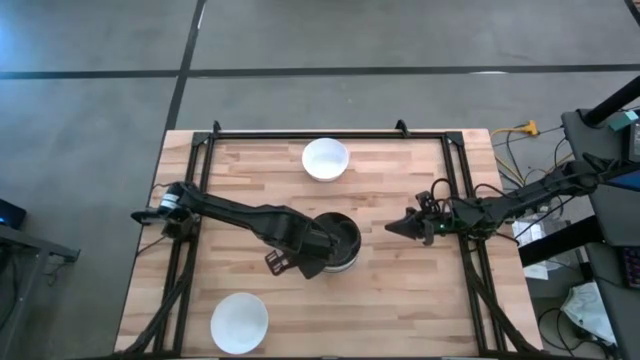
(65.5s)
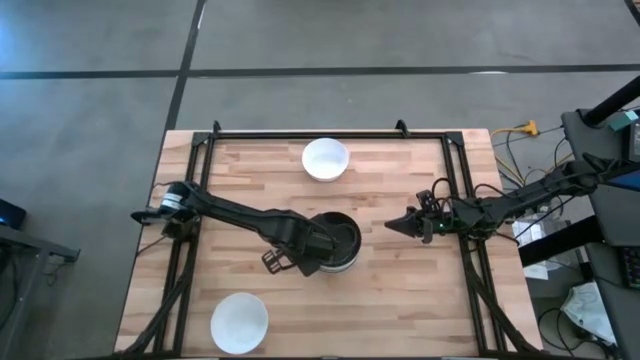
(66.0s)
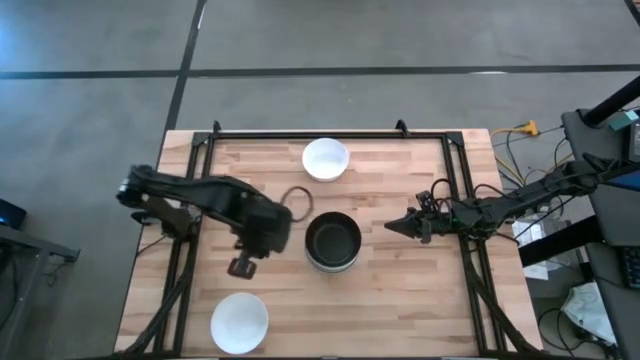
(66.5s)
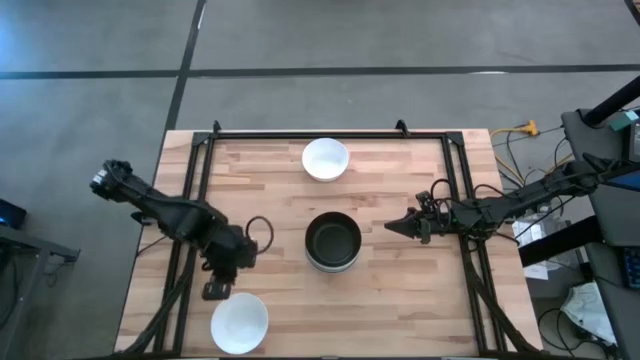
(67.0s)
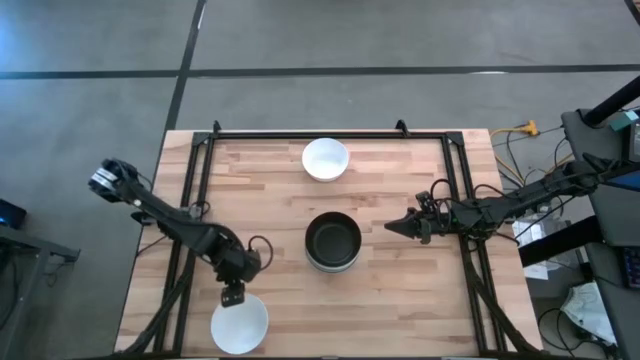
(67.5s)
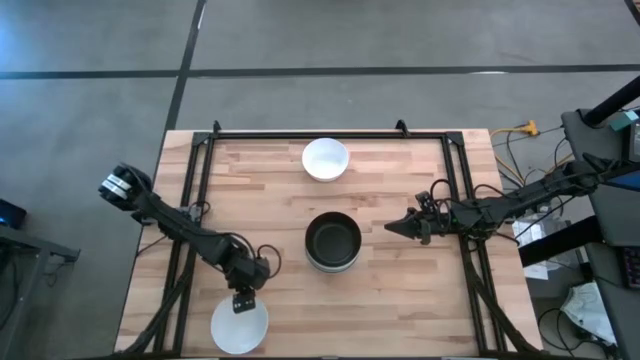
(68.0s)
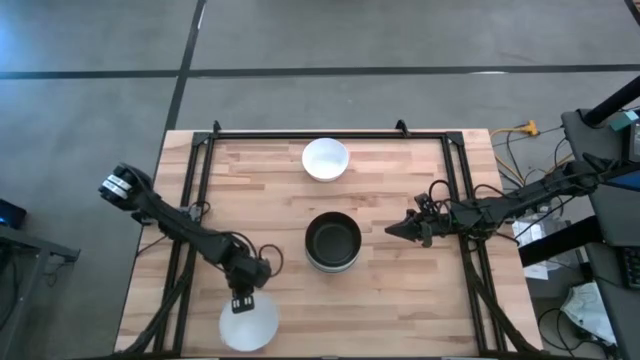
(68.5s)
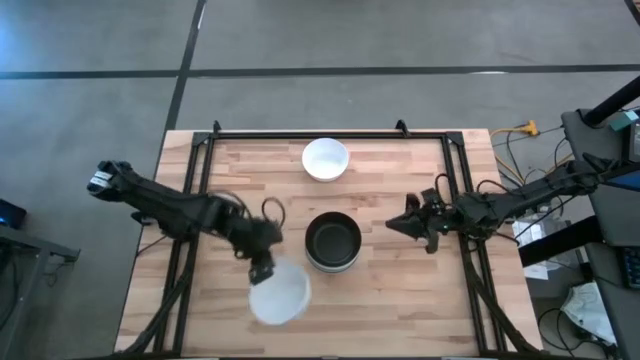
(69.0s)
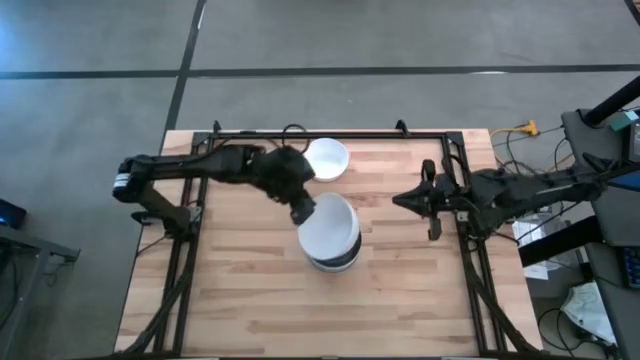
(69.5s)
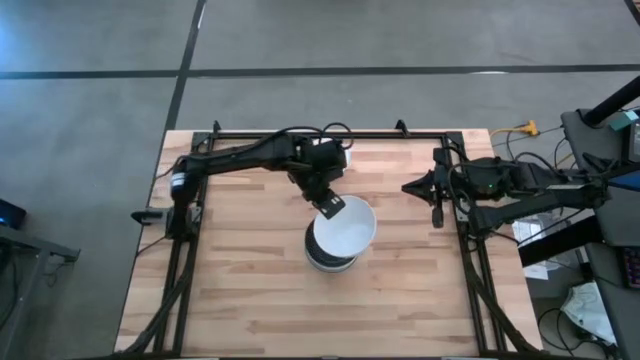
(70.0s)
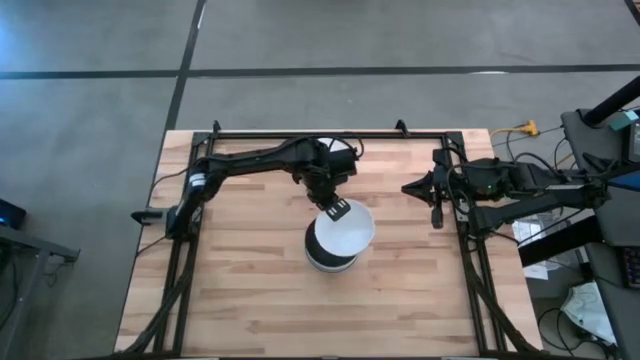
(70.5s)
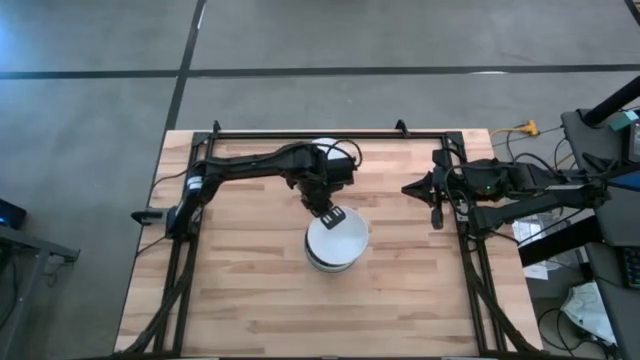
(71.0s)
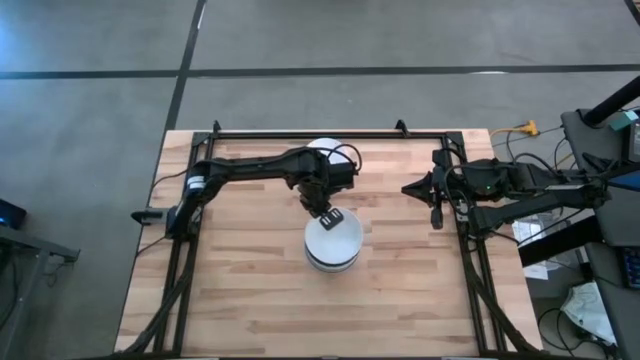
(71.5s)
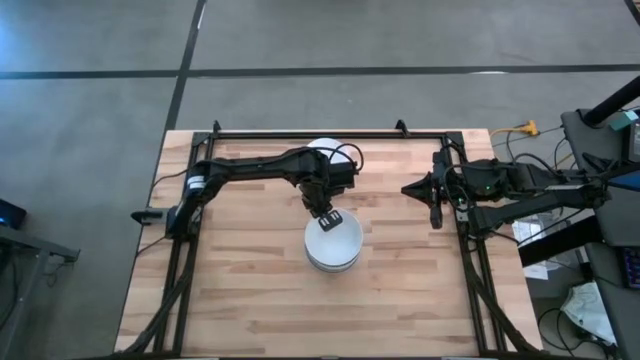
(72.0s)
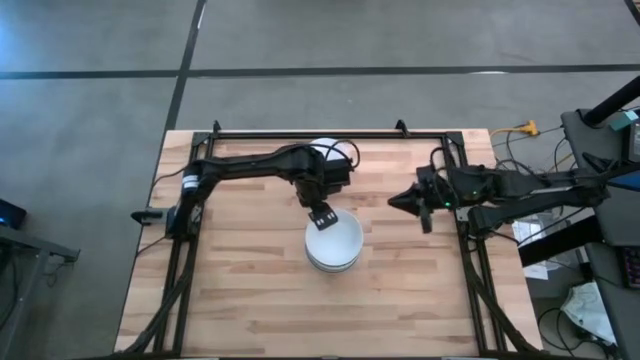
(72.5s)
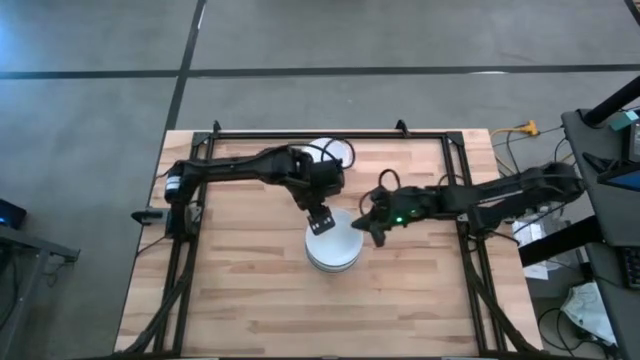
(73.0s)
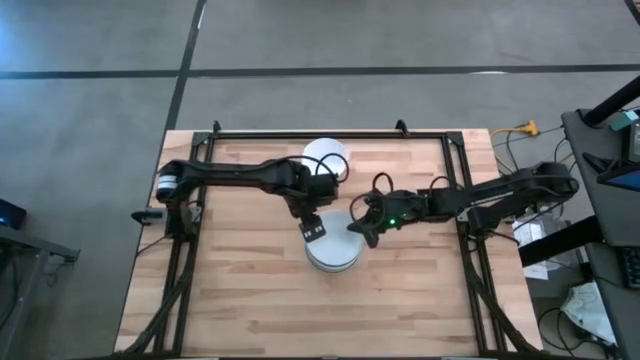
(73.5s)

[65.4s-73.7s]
Task: Nest bowls inside each other
Stack the white bowl on the top of the black bowl

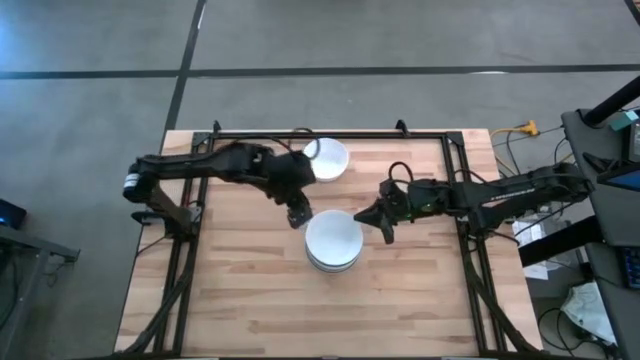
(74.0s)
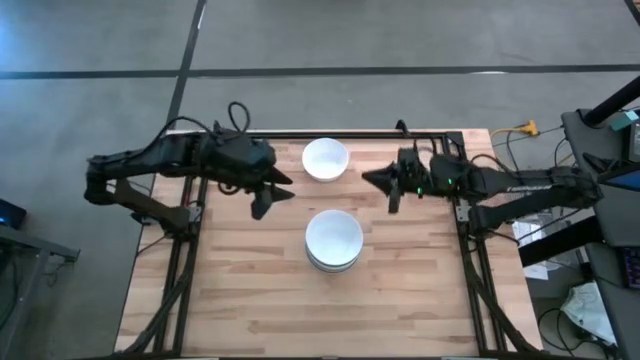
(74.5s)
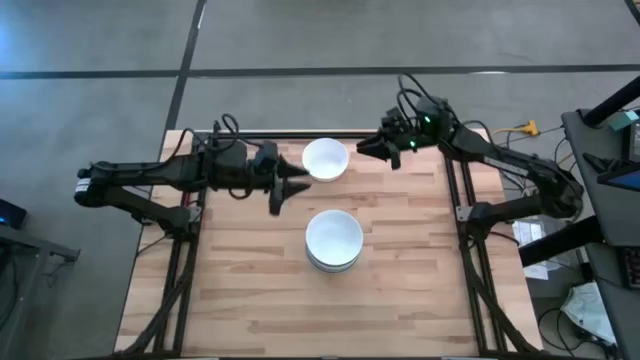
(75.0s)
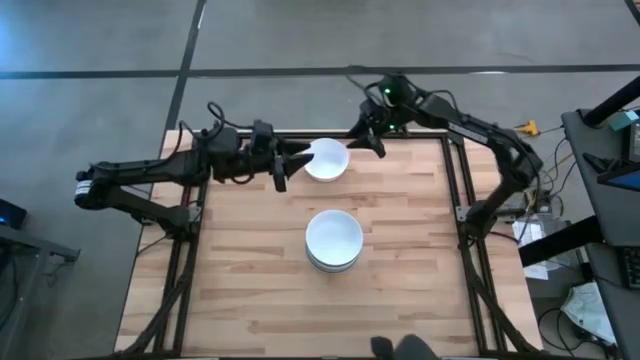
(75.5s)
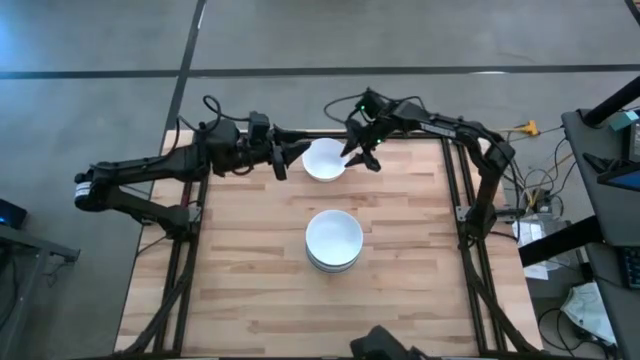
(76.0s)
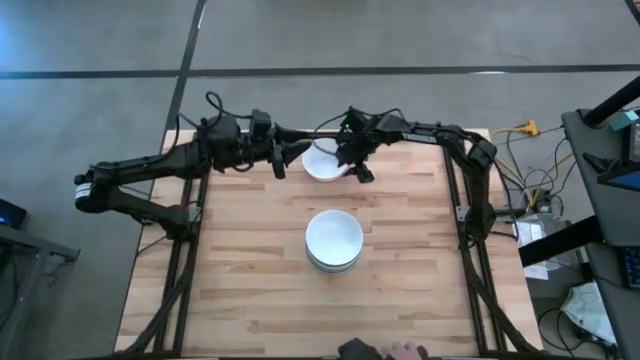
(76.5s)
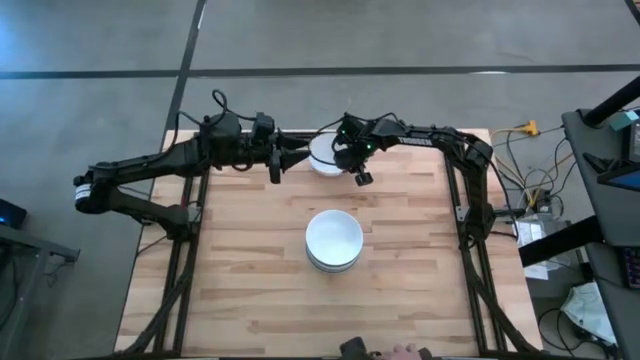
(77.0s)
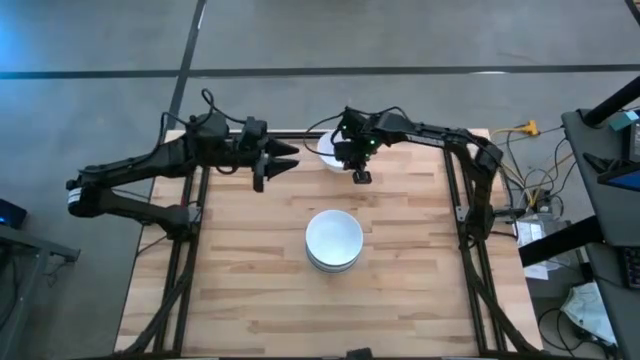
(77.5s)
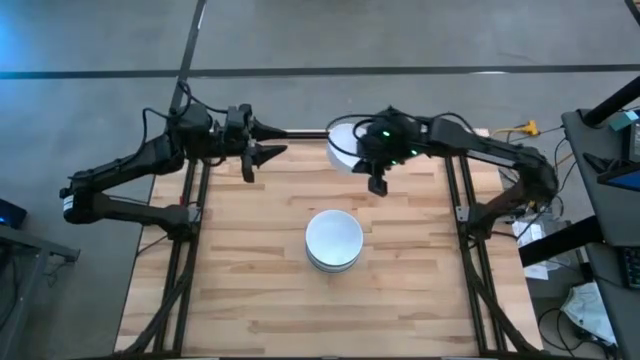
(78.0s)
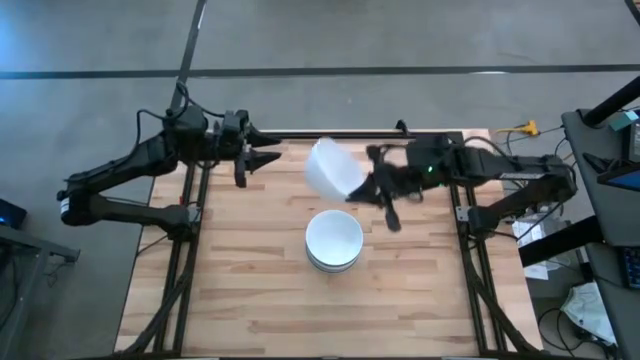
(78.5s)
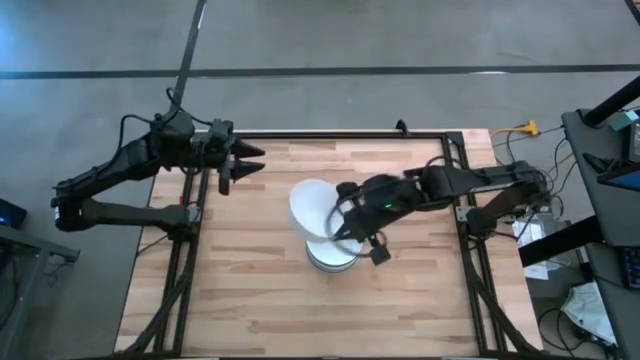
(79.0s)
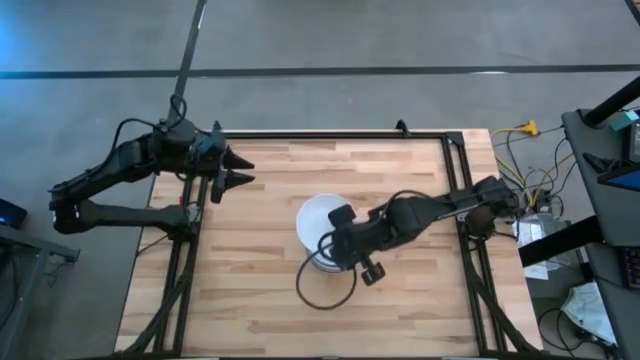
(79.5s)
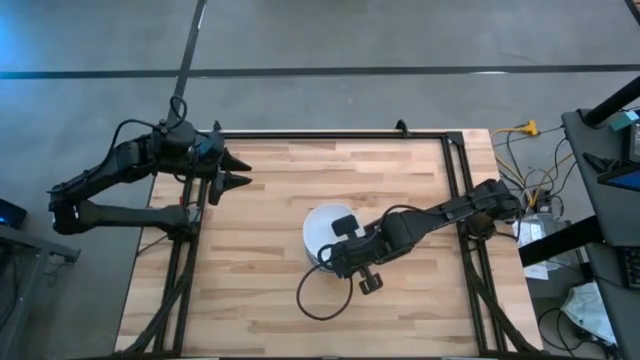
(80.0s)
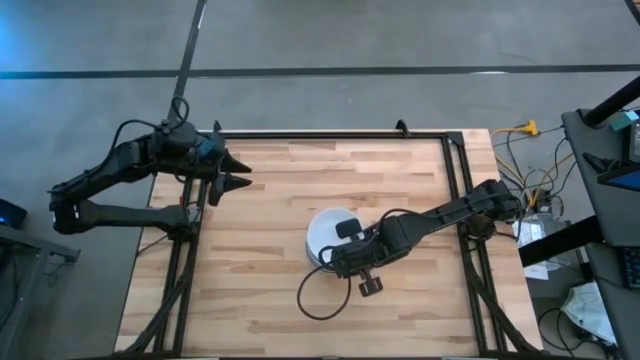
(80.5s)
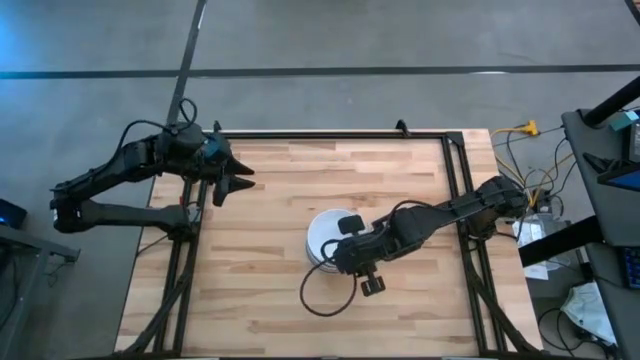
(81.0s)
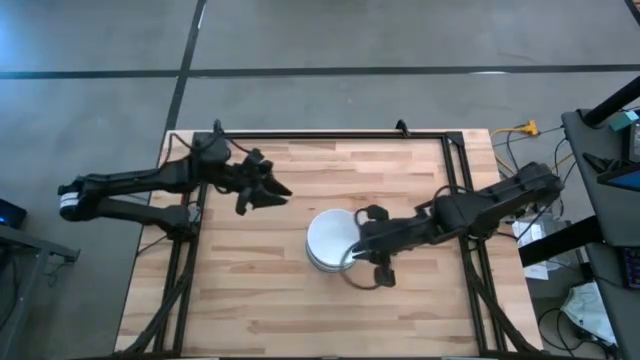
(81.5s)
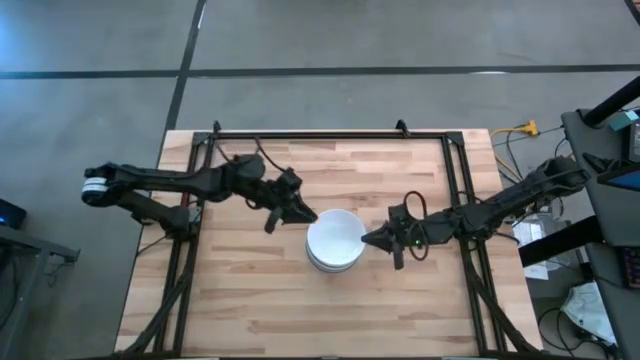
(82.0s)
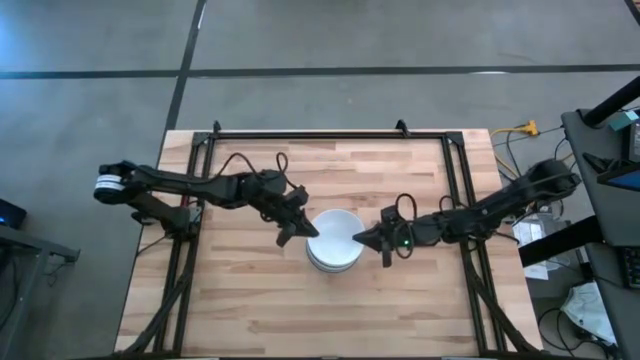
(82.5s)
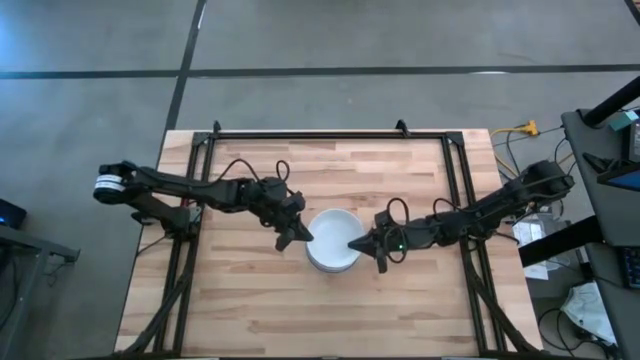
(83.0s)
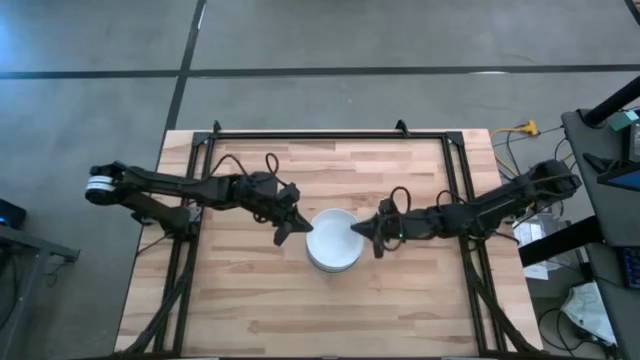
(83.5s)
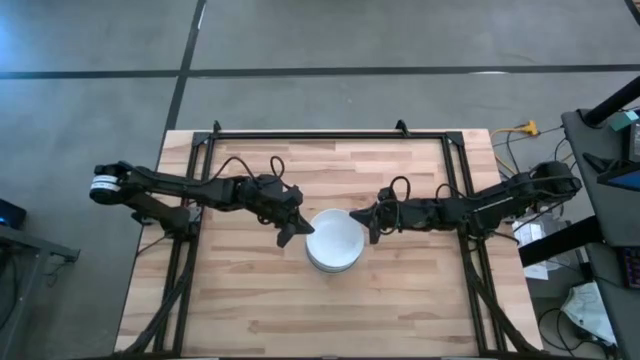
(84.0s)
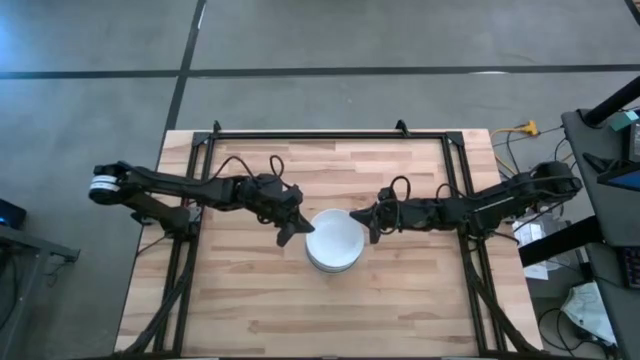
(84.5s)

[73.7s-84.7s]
Stack the white bowl on the top of the white bowl

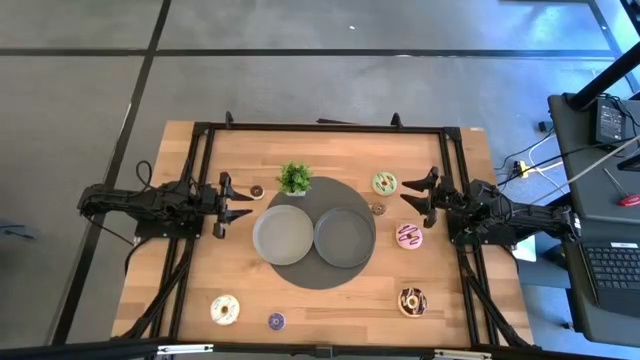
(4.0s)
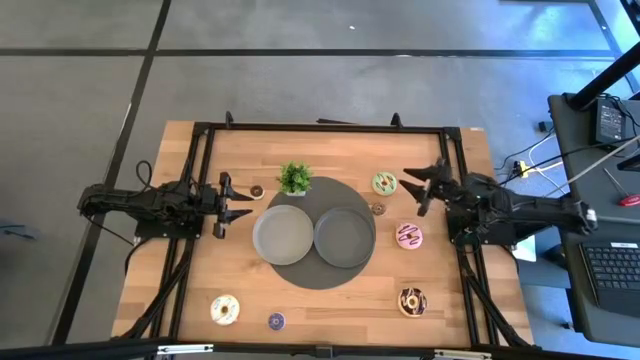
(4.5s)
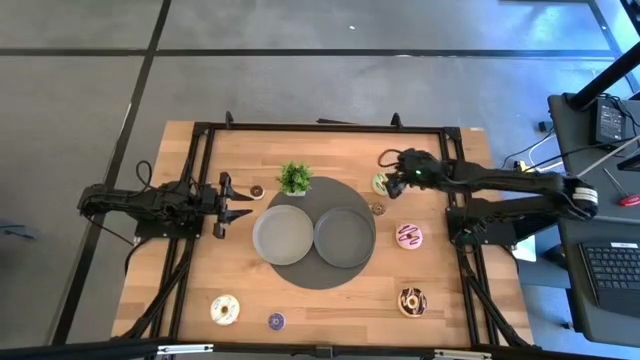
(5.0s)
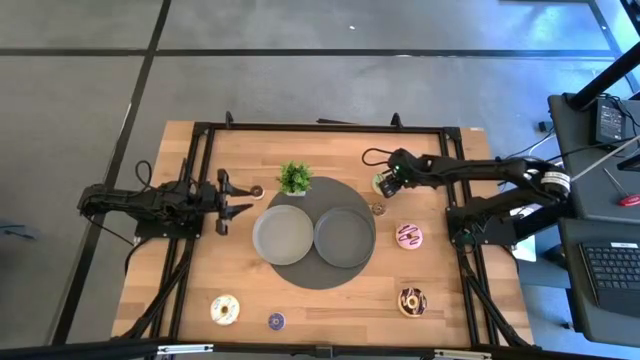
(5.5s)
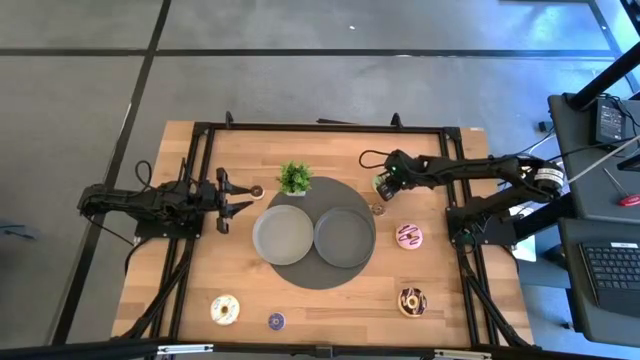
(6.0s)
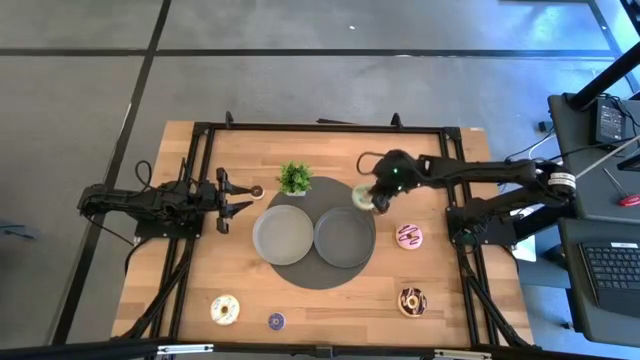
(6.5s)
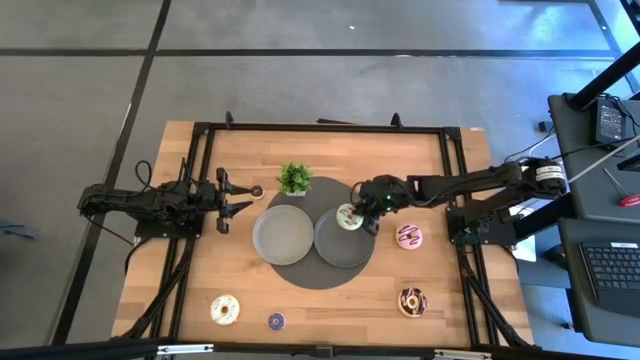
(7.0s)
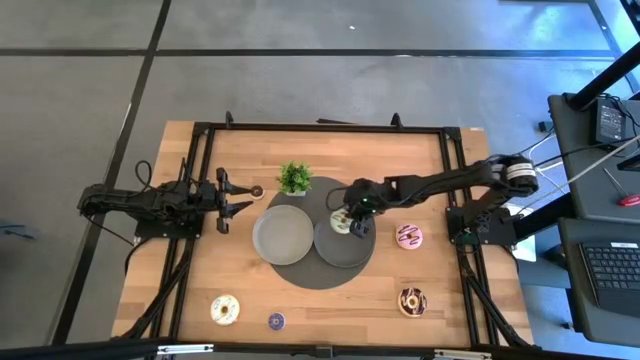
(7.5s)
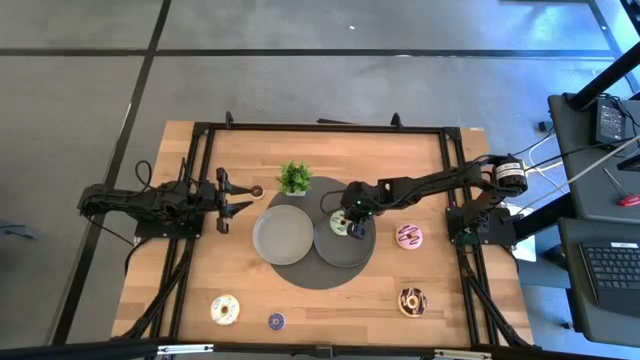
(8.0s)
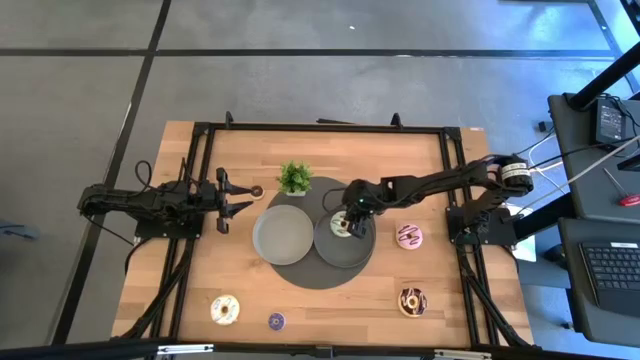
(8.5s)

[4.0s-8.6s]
Task: Pick & Place donuts
Put the large green donut on the black plate
